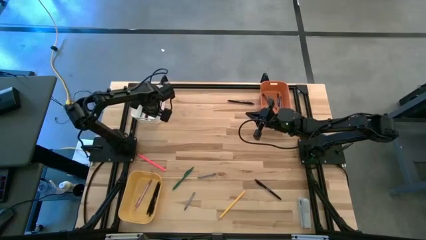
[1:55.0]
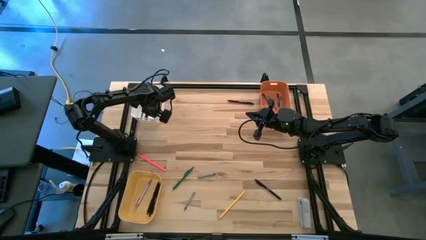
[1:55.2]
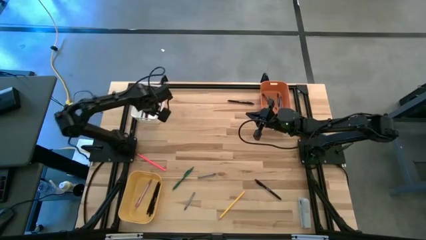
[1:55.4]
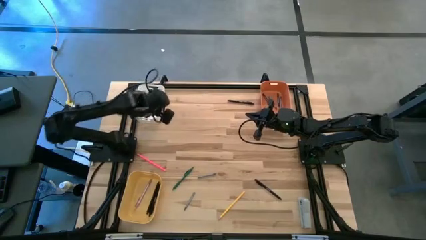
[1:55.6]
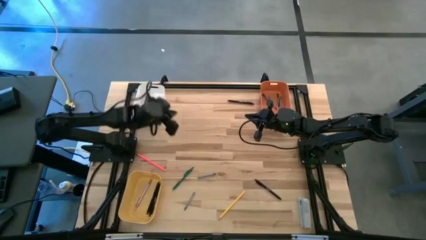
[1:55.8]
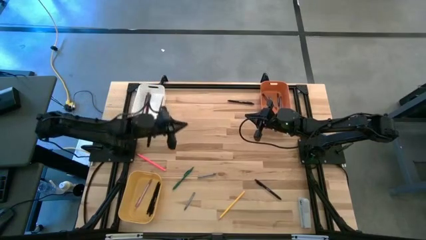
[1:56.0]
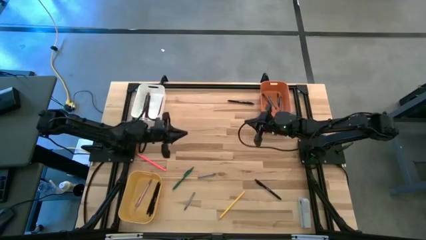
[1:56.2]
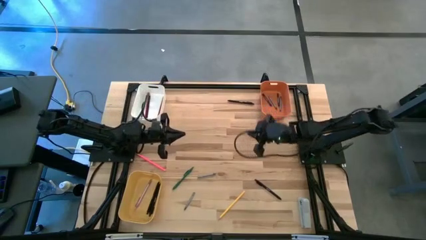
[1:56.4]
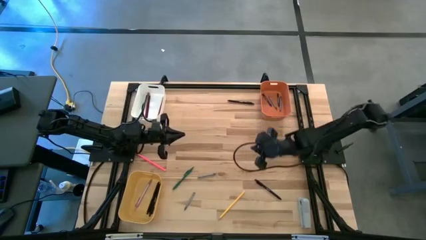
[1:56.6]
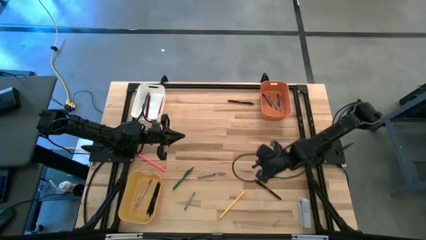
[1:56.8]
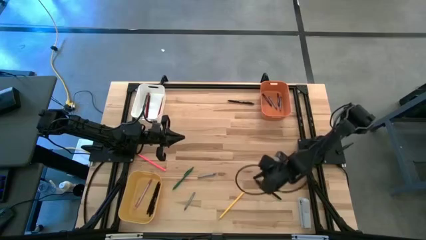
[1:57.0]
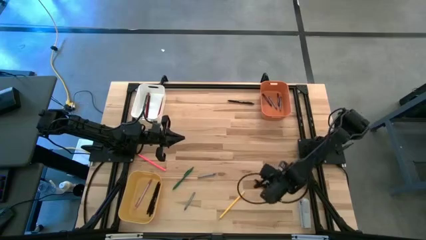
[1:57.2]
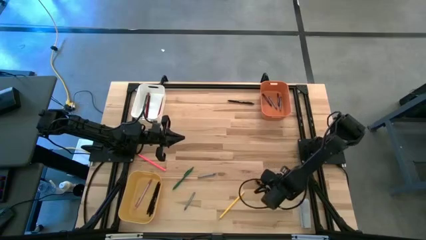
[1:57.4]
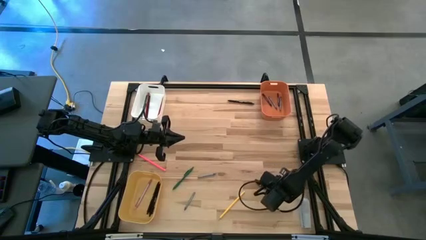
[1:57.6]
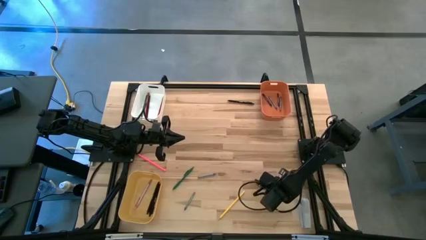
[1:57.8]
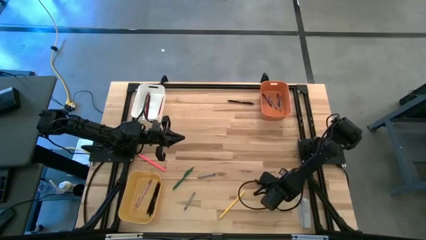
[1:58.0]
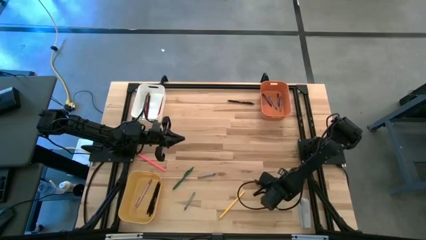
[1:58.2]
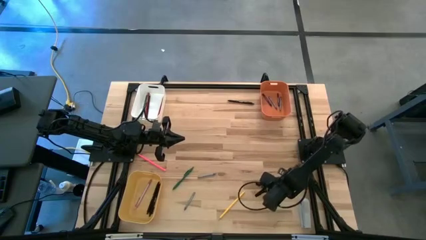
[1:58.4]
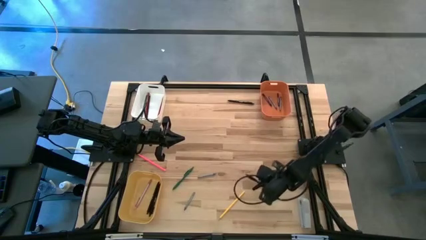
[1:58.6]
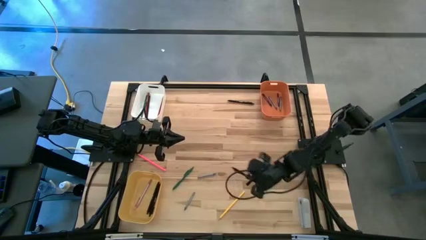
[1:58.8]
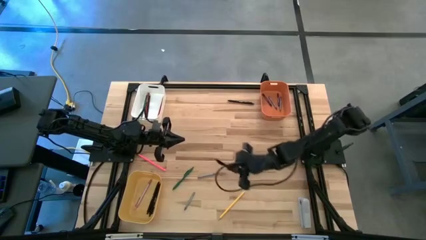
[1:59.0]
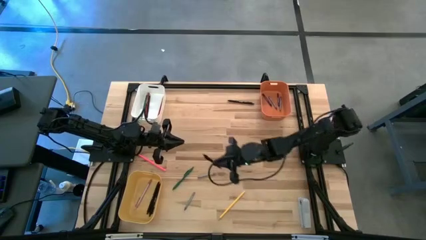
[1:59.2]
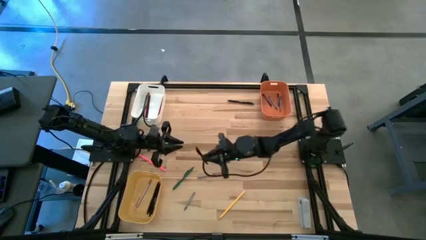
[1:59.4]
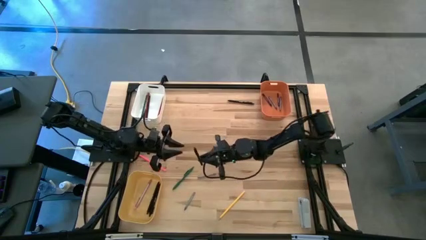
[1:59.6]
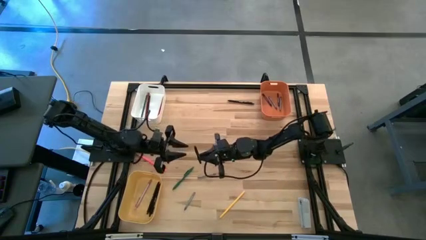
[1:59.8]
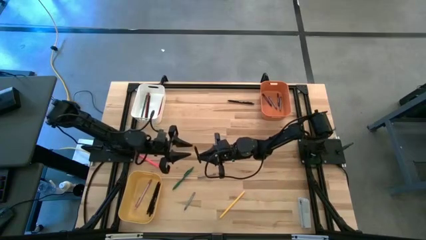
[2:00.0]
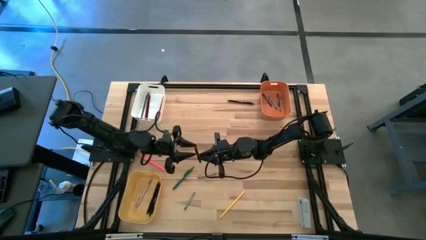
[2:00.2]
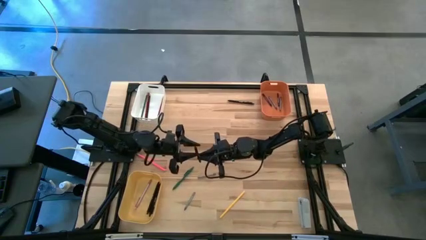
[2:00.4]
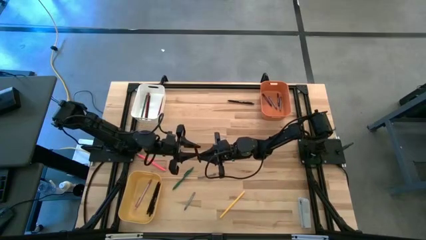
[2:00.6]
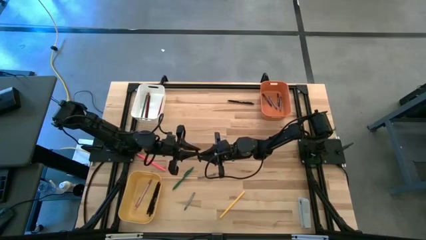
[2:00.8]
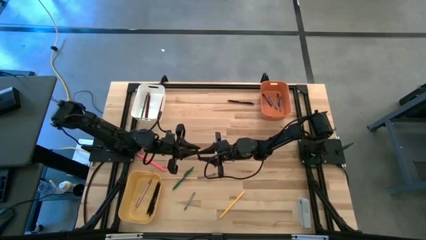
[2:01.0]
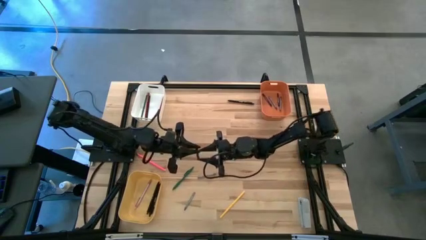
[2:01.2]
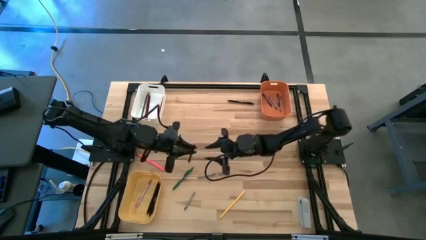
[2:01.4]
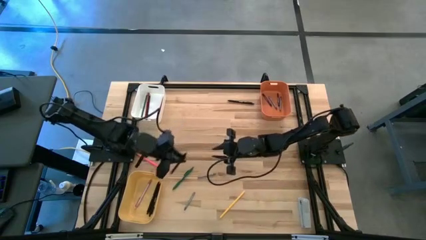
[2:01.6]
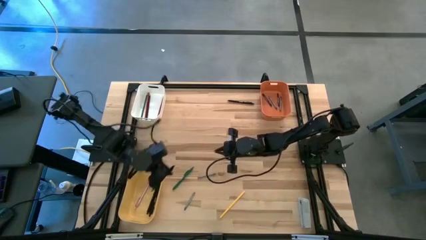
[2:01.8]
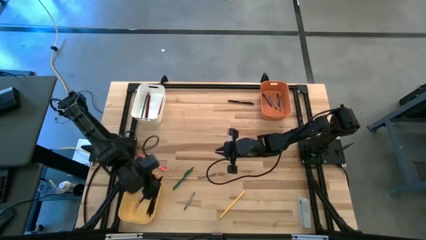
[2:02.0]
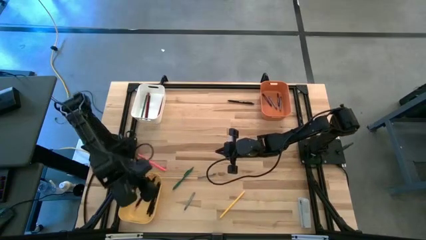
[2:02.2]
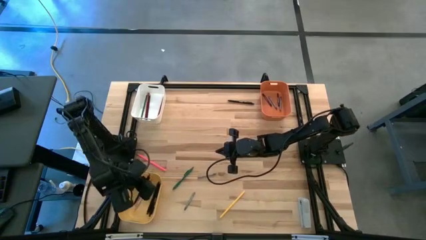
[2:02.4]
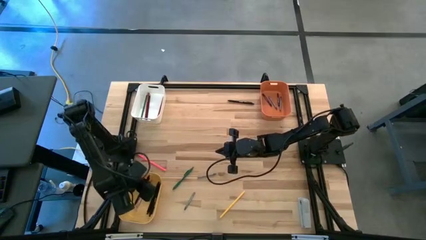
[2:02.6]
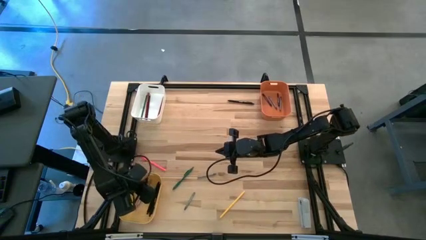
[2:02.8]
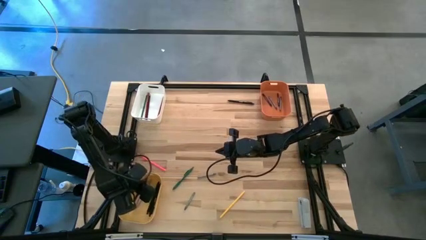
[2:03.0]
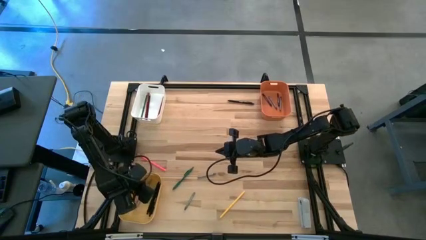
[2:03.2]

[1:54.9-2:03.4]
Task: Sort crayons/erasers/pens/pencils in bins
Put the bottom black pen into the yellow bin

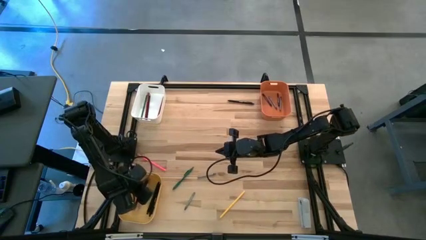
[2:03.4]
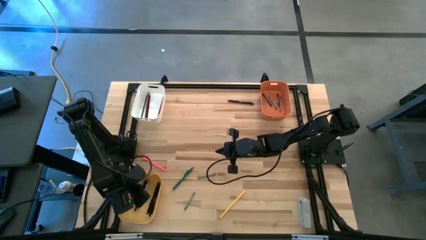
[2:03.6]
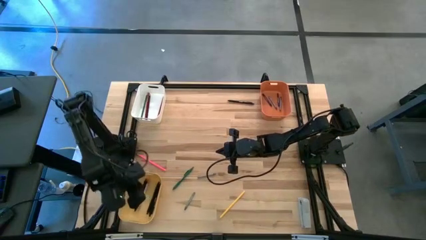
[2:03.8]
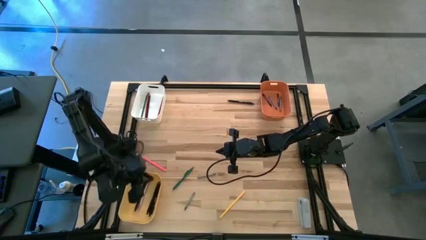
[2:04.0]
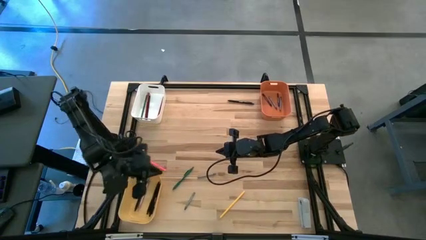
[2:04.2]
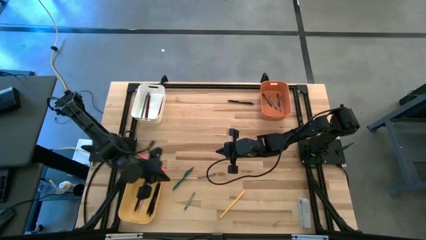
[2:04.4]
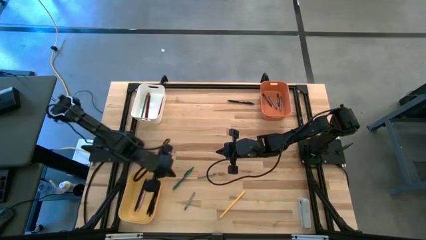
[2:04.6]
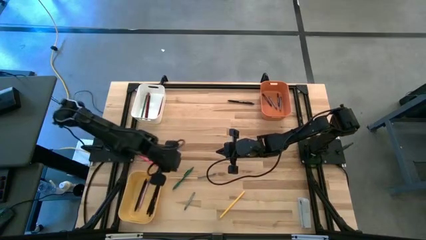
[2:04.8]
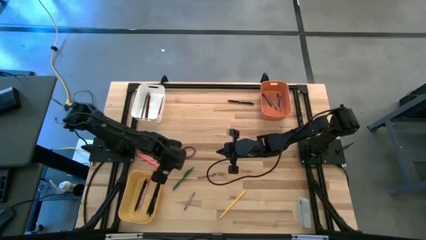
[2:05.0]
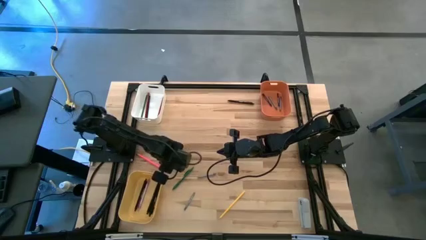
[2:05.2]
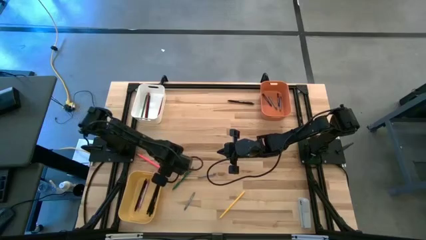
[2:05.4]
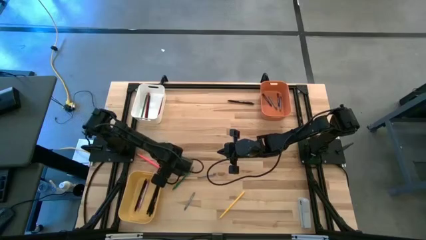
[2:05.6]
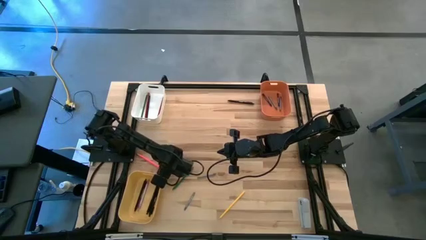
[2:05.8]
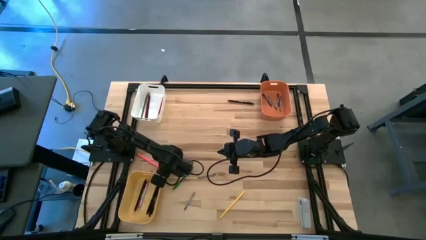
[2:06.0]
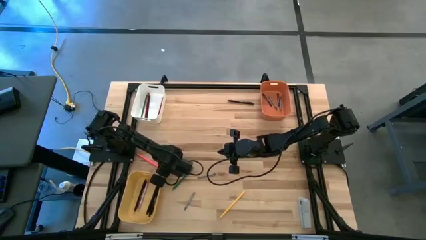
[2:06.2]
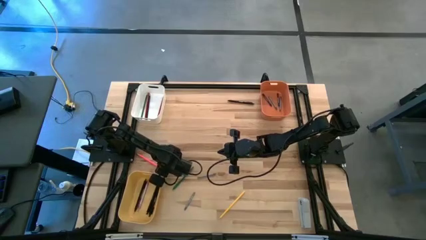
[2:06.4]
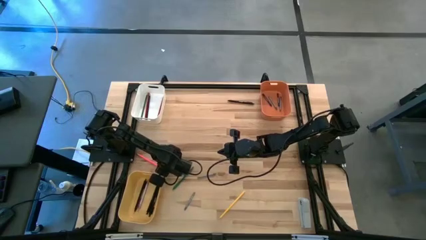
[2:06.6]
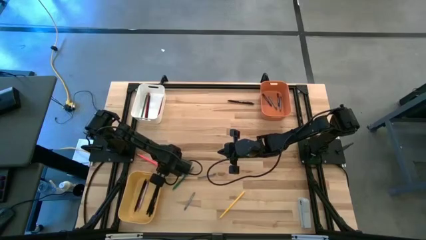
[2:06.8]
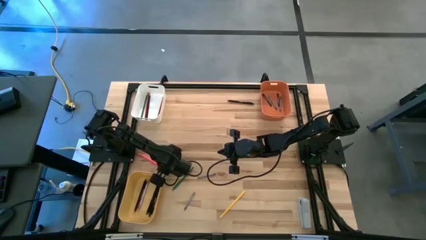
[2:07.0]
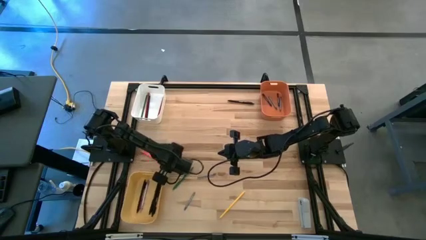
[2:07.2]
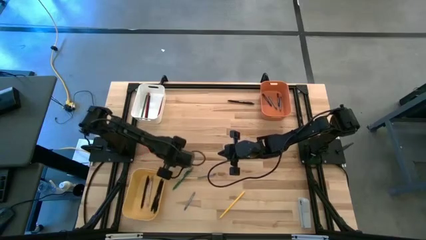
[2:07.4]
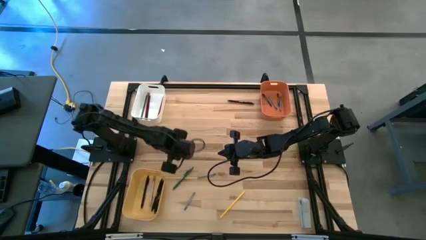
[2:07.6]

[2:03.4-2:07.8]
Put the pink pencil into the white bin

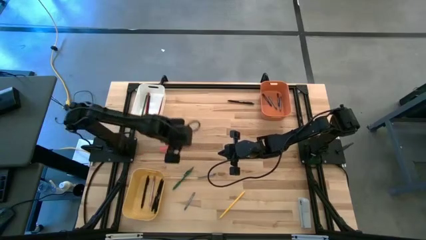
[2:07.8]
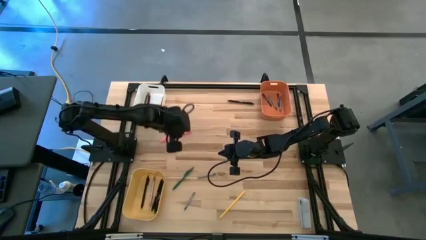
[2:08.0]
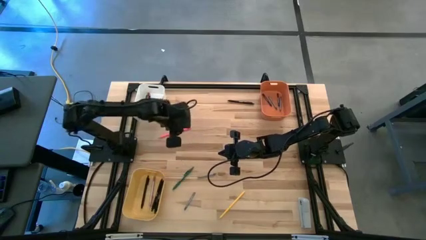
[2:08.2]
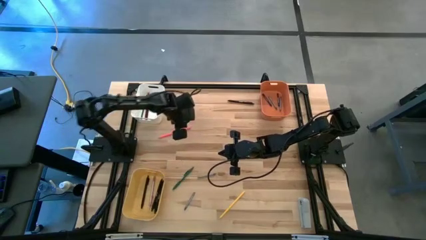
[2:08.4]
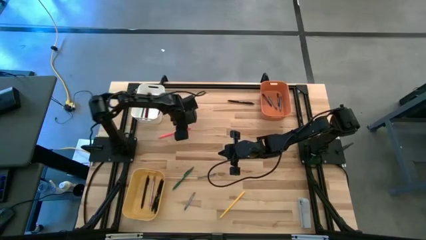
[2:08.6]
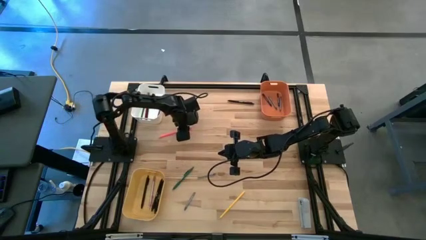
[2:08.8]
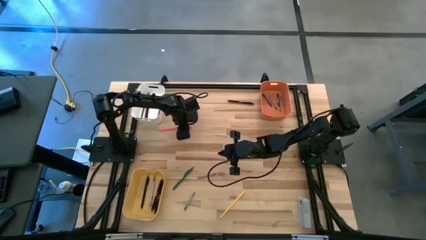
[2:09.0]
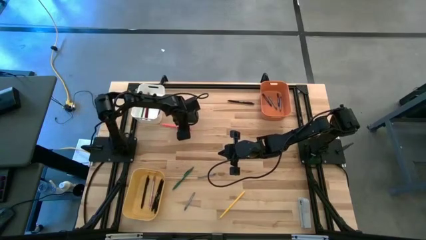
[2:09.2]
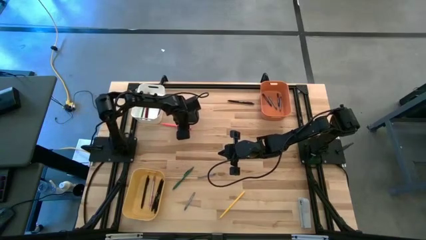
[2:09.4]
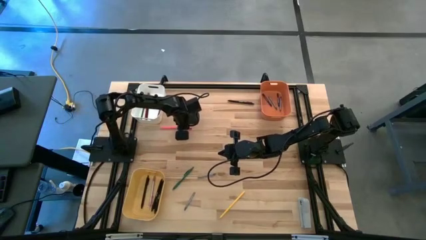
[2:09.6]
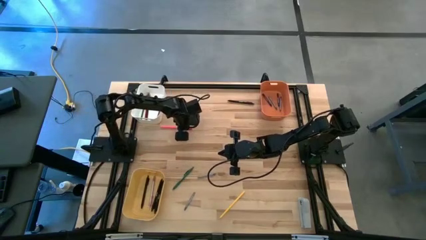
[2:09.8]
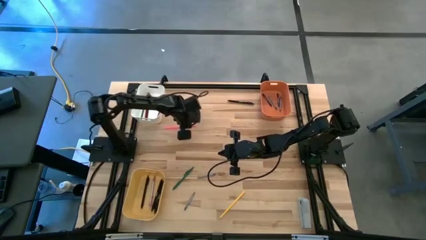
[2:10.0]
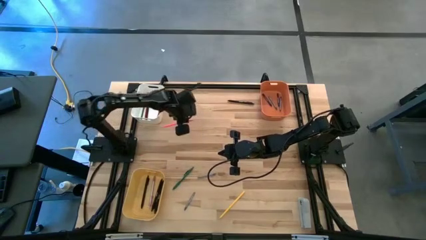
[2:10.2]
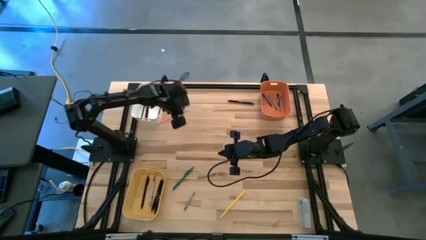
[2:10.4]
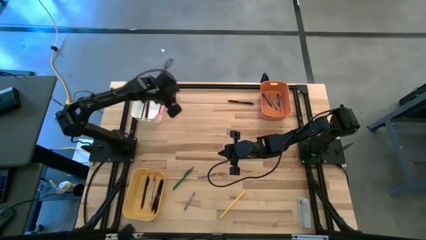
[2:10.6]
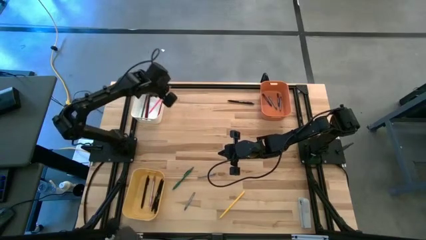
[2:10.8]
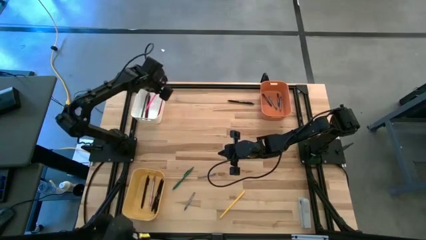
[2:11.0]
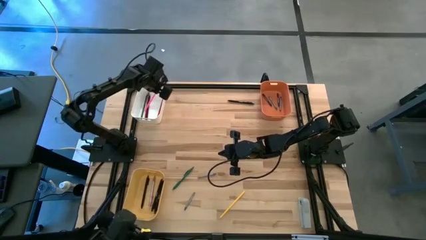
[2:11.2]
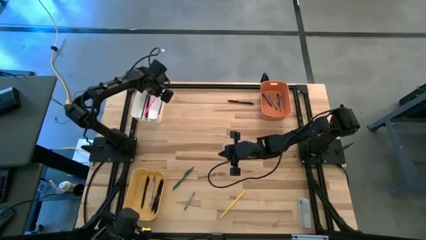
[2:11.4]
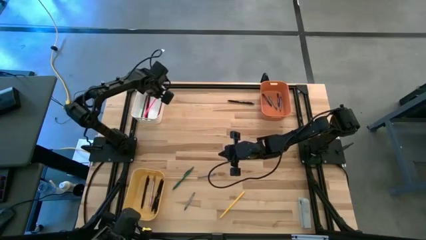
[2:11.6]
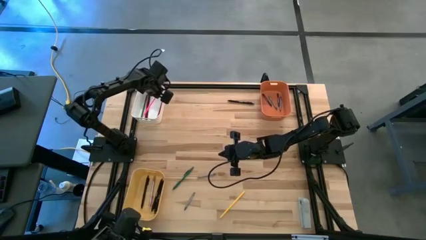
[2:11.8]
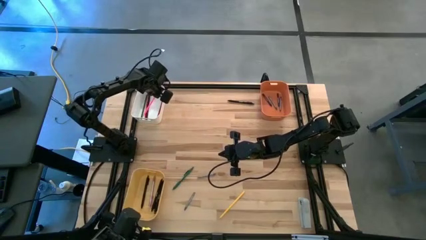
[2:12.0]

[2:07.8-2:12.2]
Put the pink pencil into the white bin
